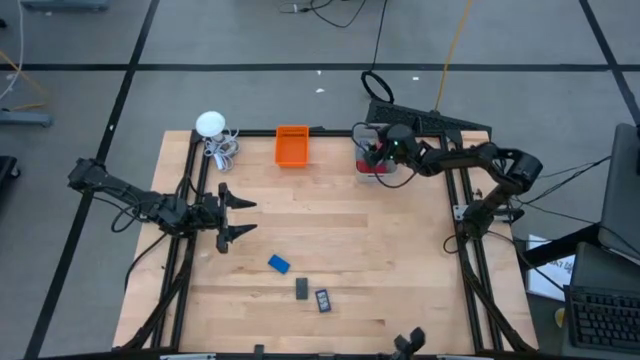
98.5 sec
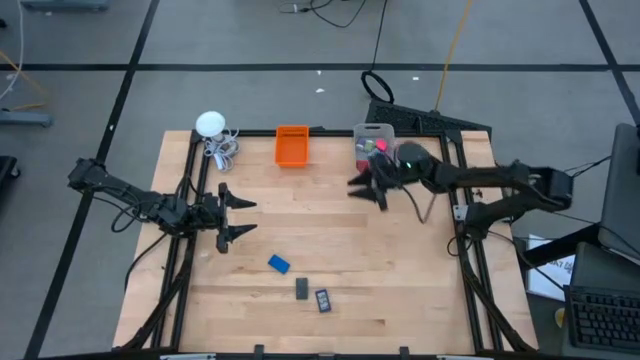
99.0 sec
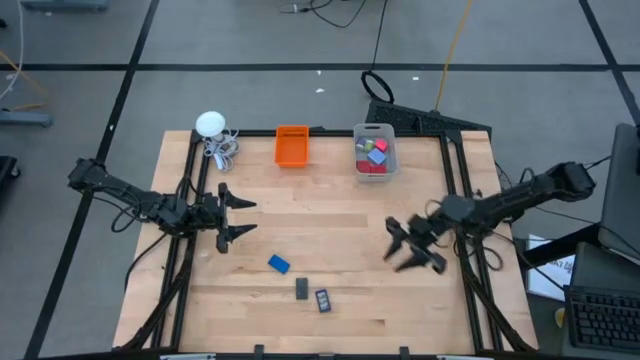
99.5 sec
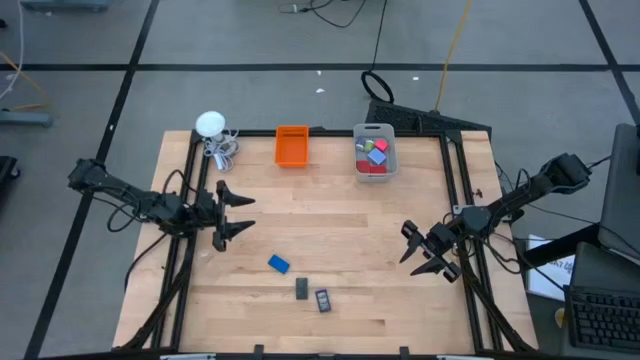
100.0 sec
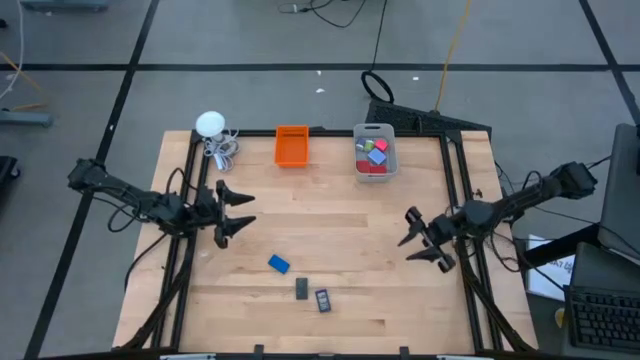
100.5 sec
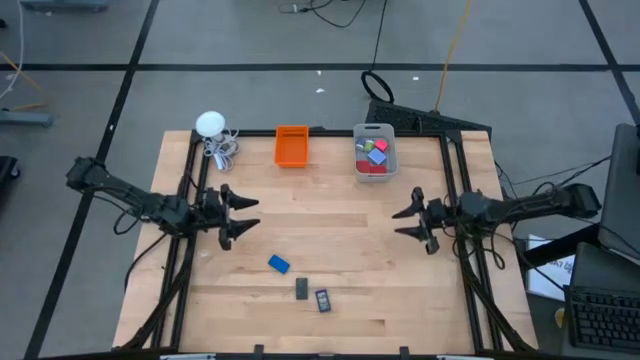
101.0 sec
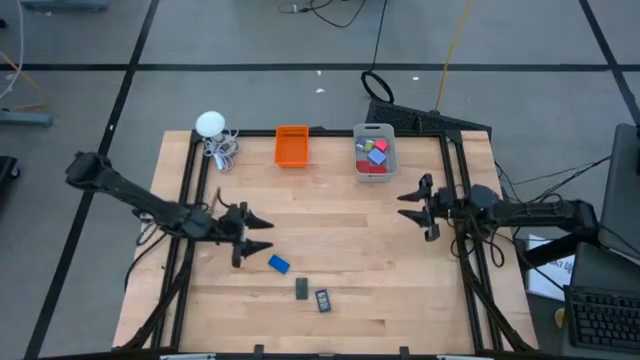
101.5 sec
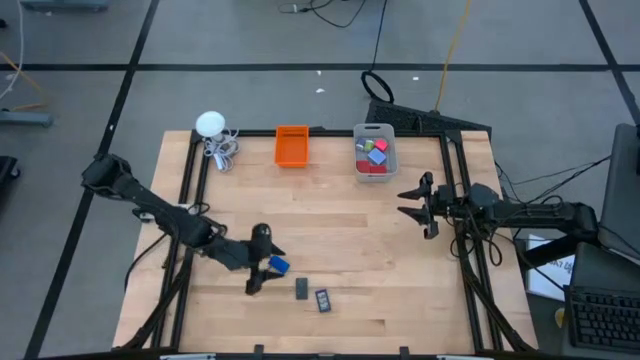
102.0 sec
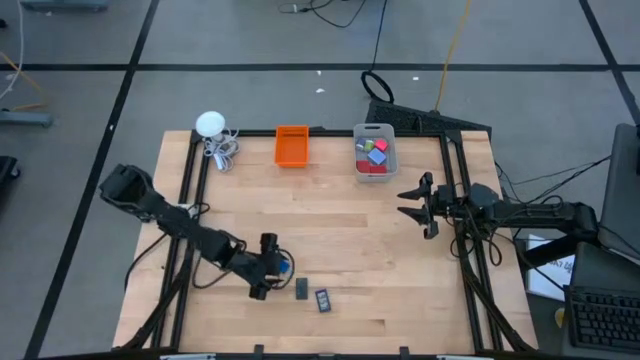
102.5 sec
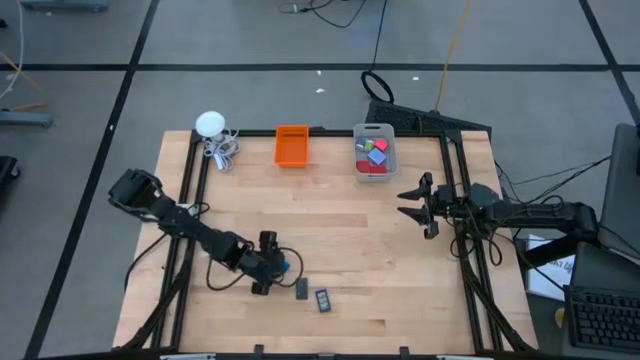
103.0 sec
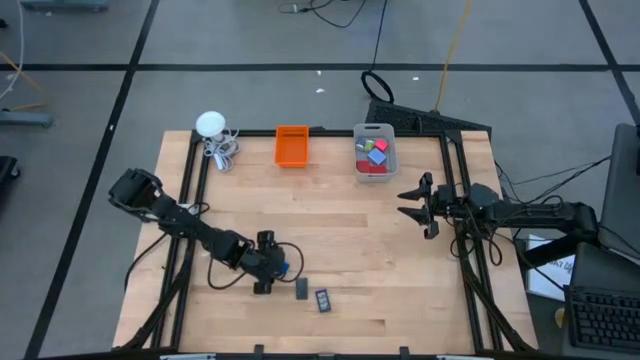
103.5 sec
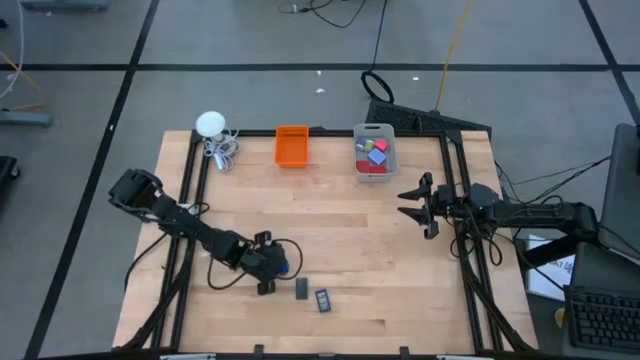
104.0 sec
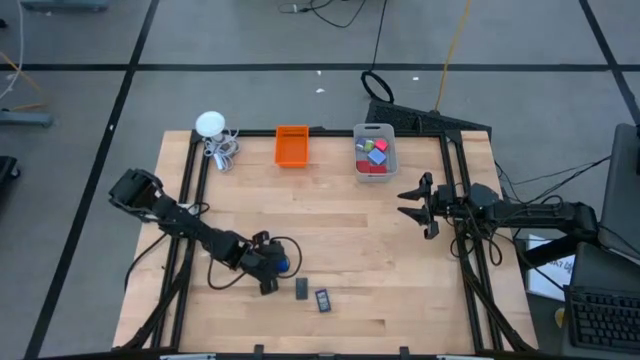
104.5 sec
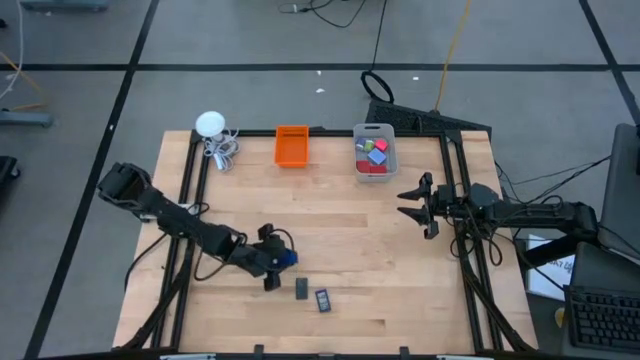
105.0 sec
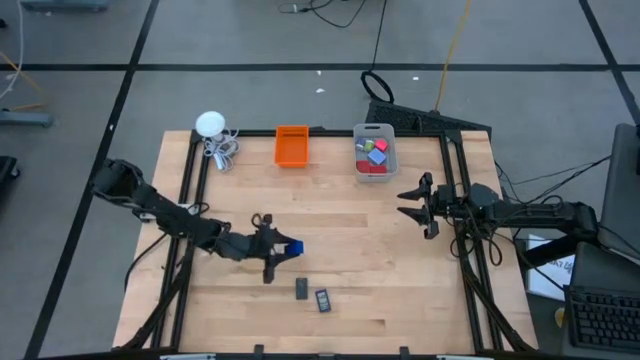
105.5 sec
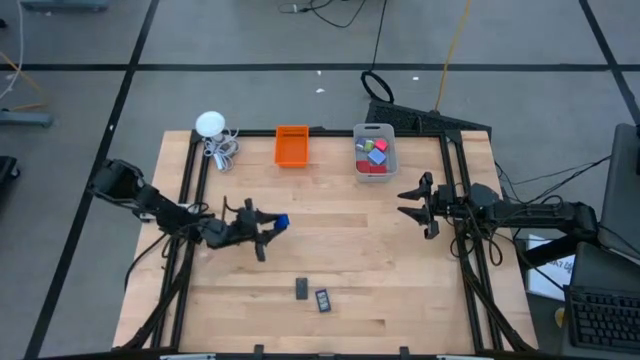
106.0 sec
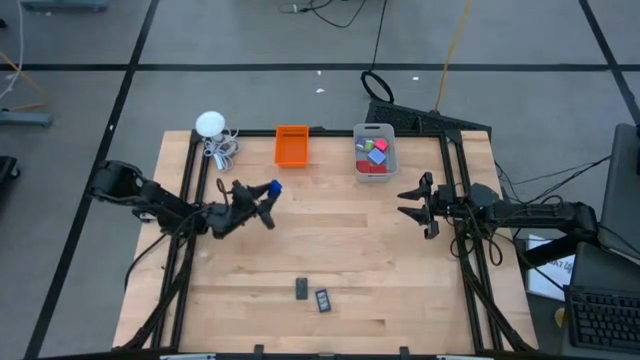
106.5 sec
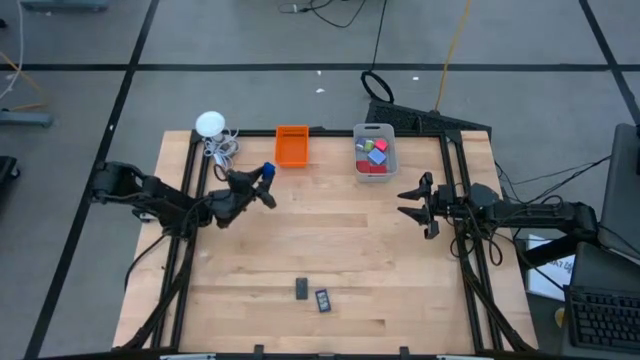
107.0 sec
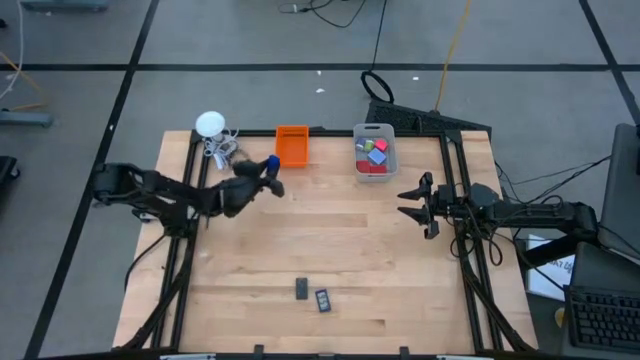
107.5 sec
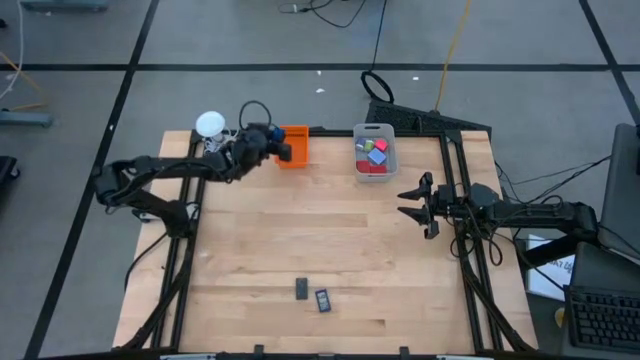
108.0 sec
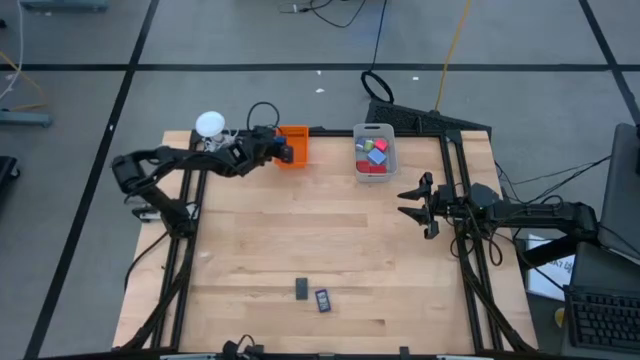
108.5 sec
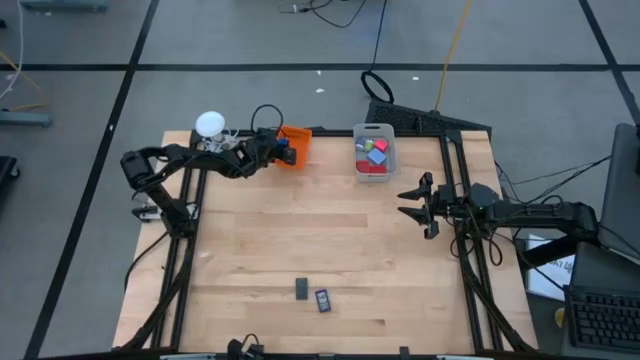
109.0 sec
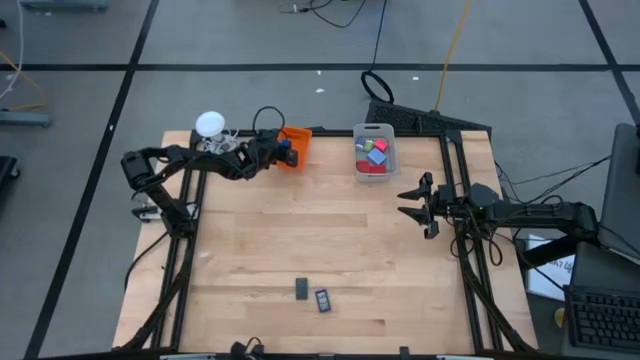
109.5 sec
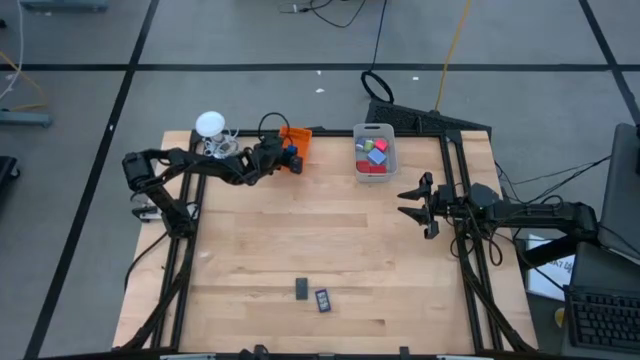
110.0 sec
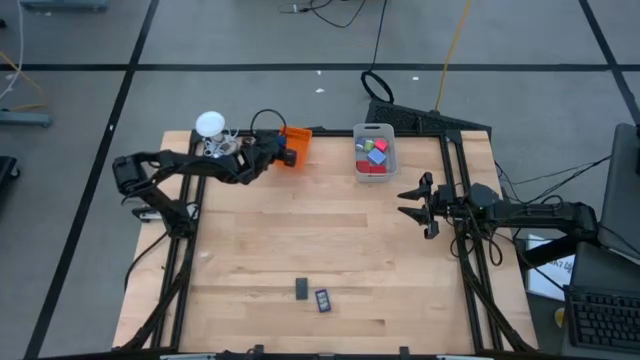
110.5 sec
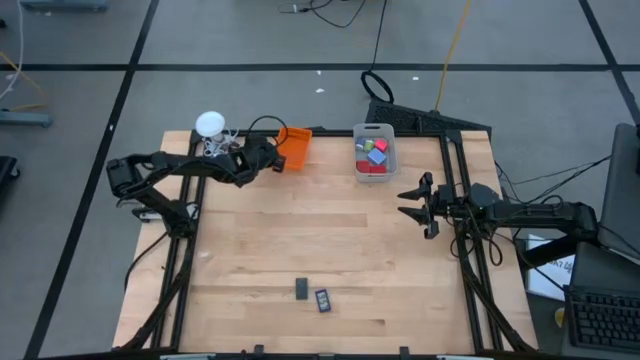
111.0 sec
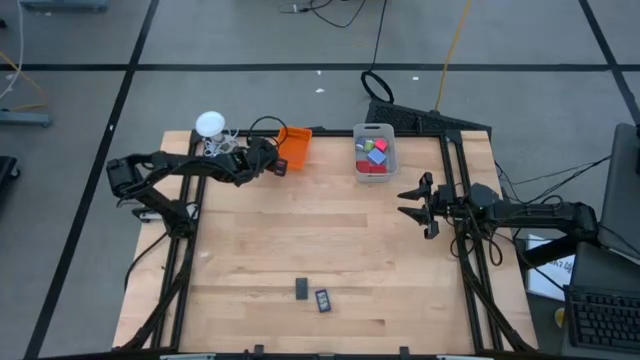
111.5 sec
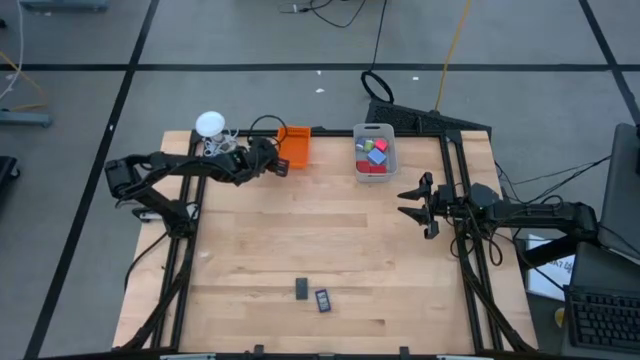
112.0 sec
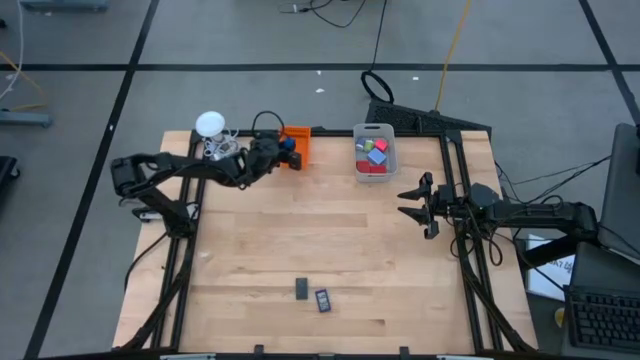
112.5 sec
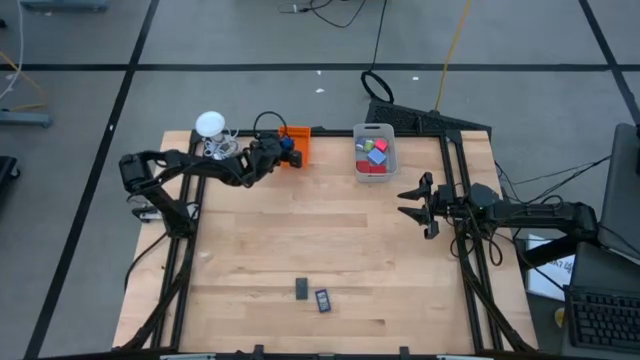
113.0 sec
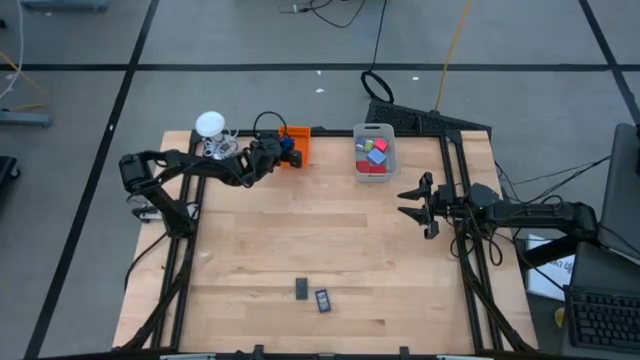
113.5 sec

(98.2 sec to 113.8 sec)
Task: Pick & Place Office items
Put the top blue digital timer into the orange bin

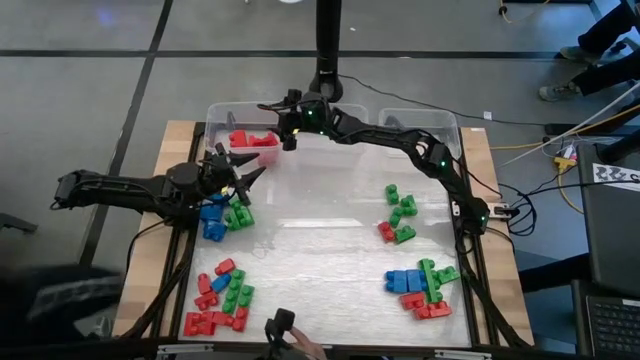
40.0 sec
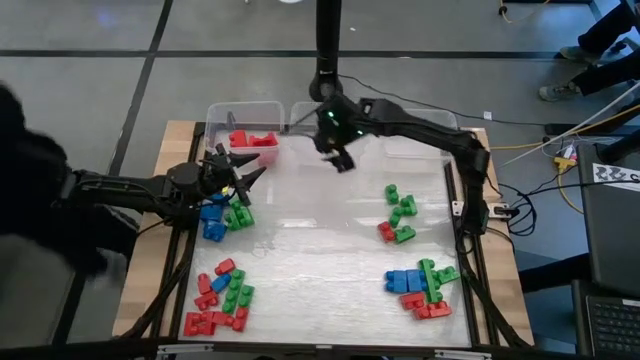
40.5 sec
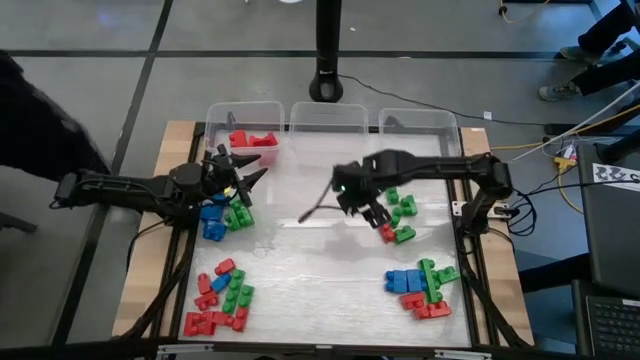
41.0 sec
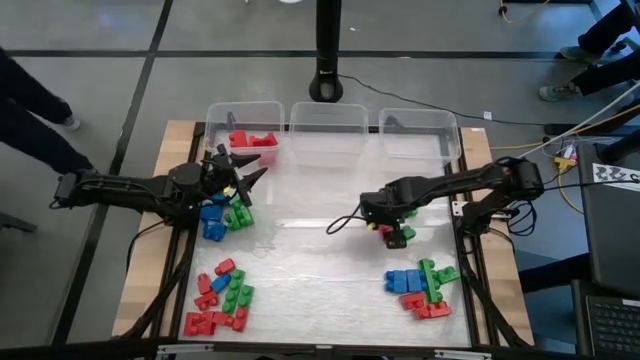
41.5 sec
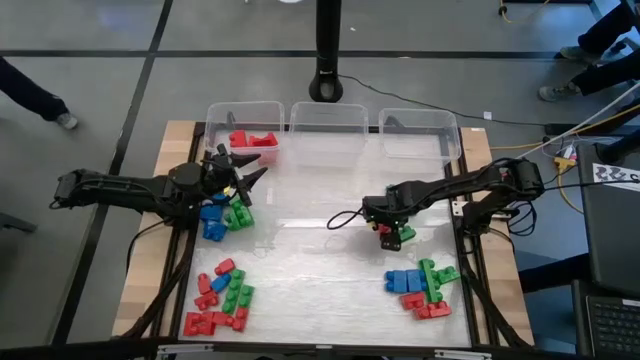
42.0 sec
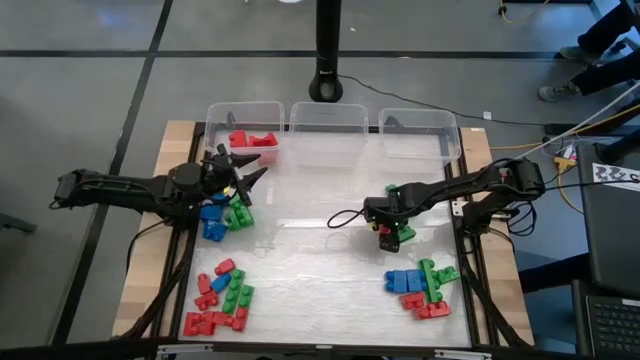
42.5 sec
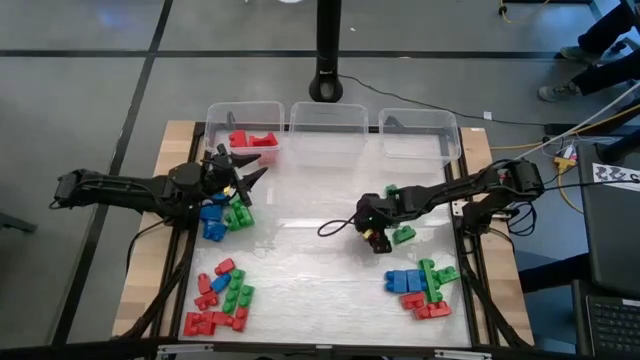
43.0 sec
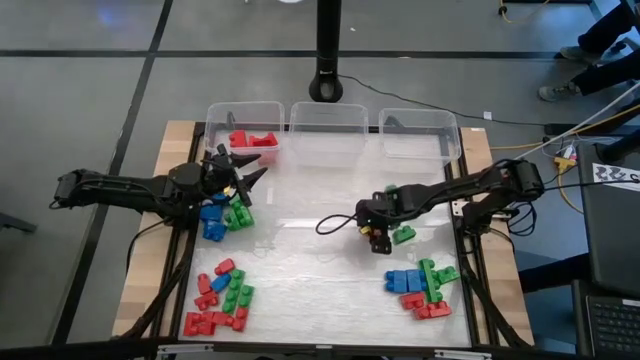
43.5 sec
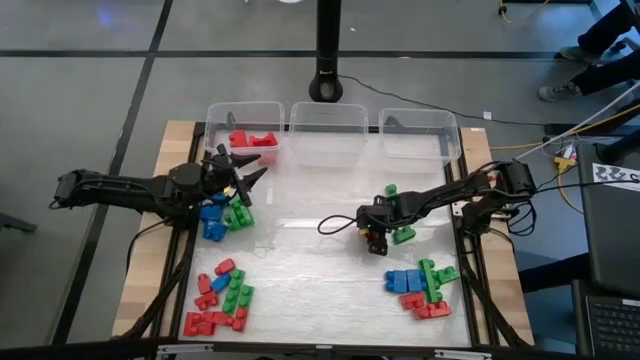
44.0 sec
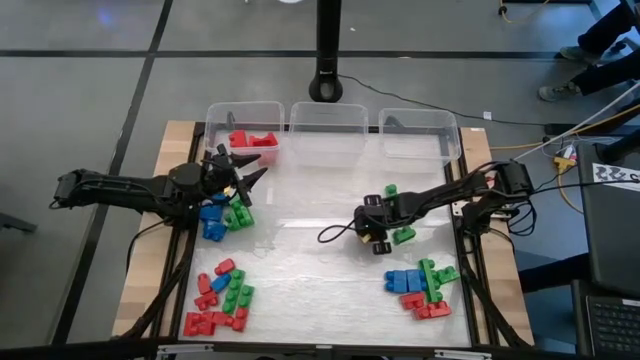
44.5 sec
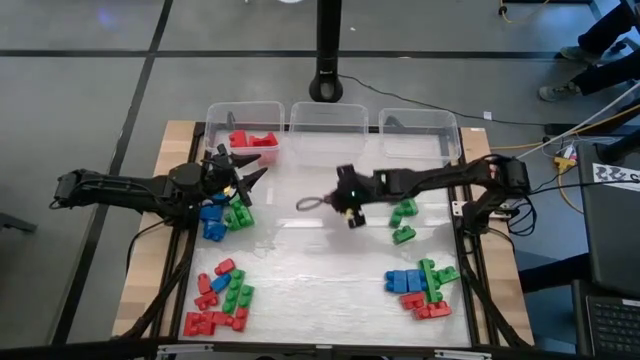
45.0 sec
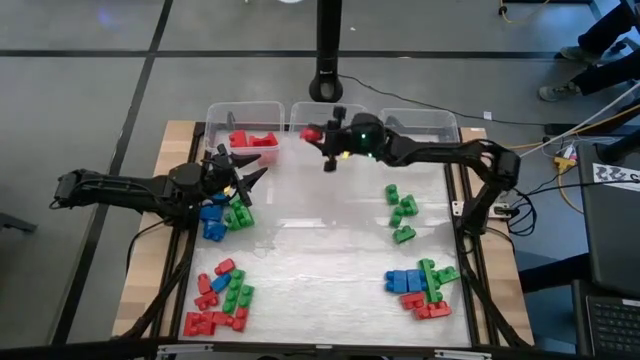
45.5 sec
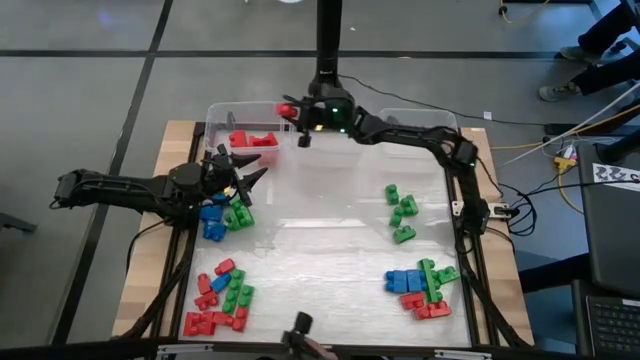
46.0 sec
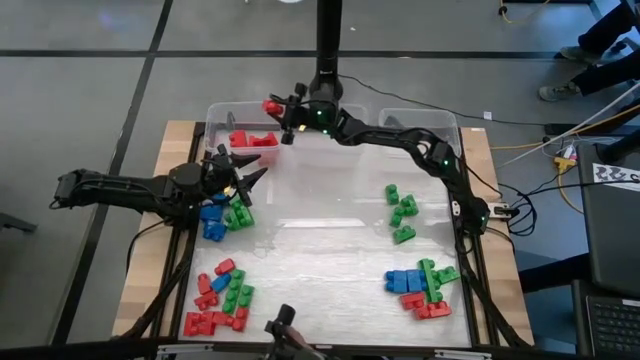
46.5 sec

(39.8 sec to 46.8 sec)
Task: Sort blocks
Put the red game piece into the left transparent bin
